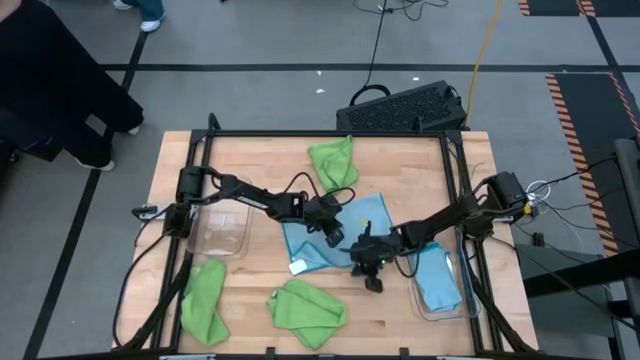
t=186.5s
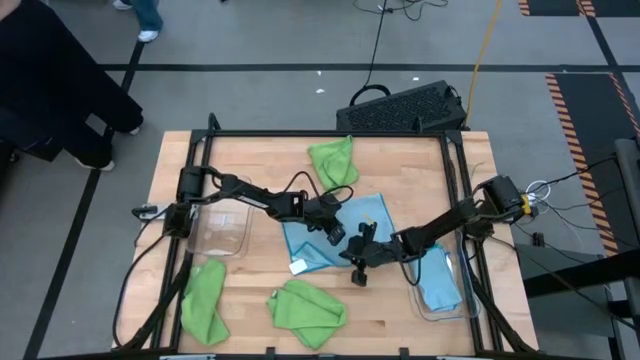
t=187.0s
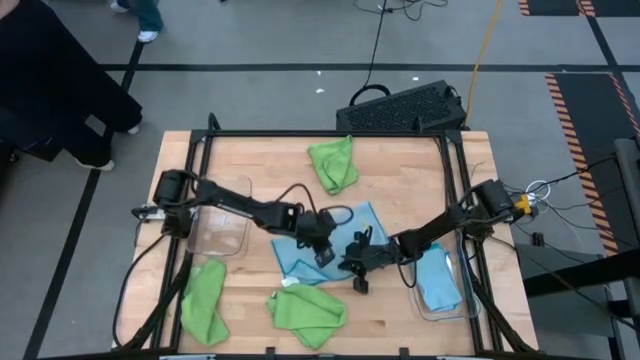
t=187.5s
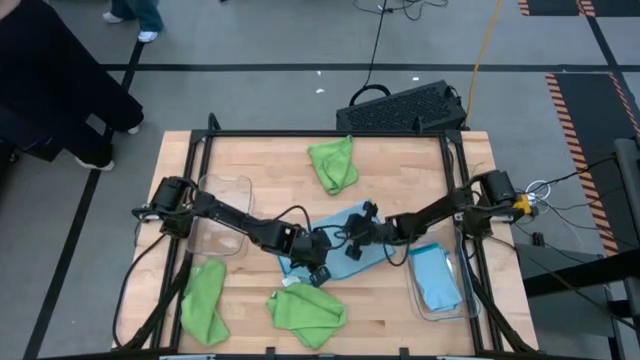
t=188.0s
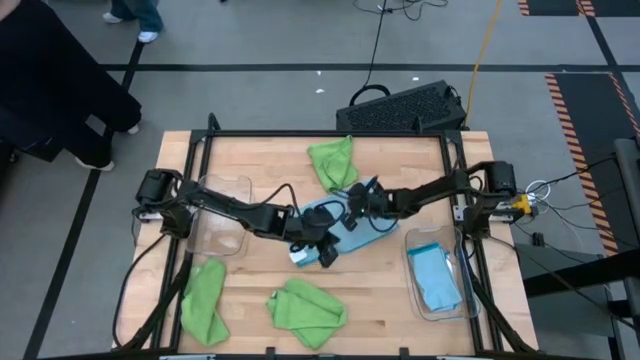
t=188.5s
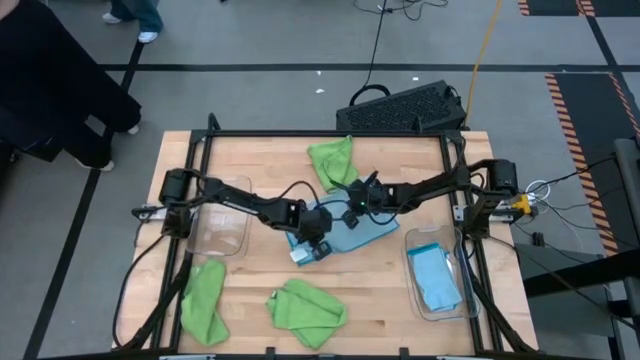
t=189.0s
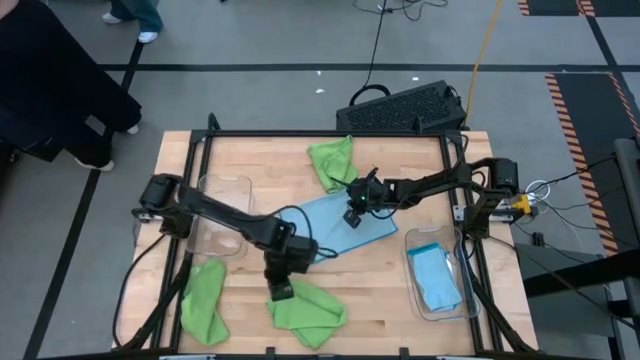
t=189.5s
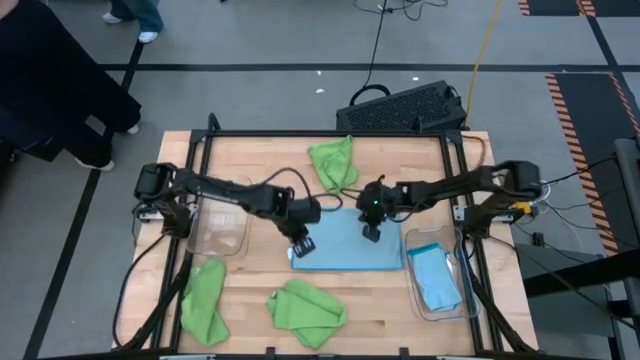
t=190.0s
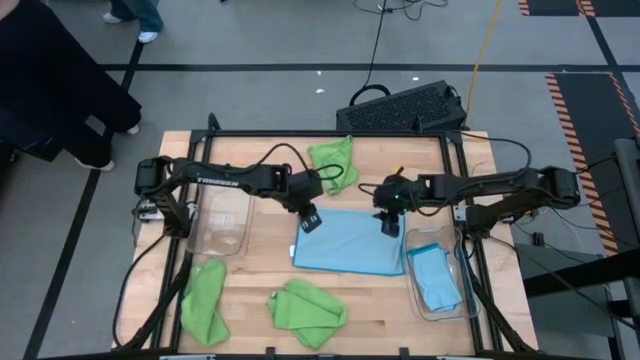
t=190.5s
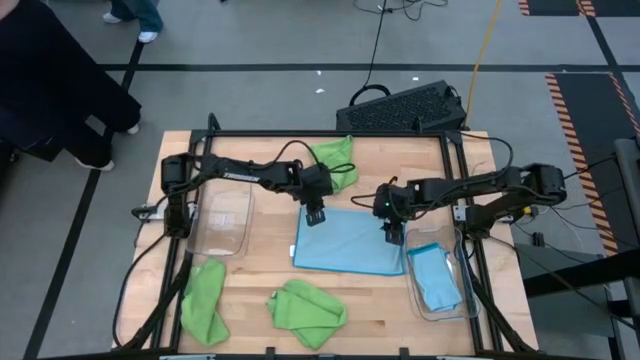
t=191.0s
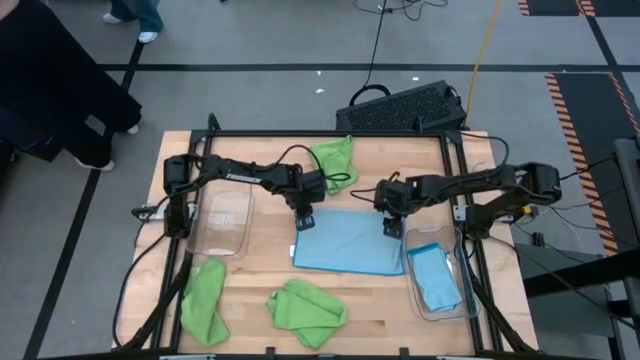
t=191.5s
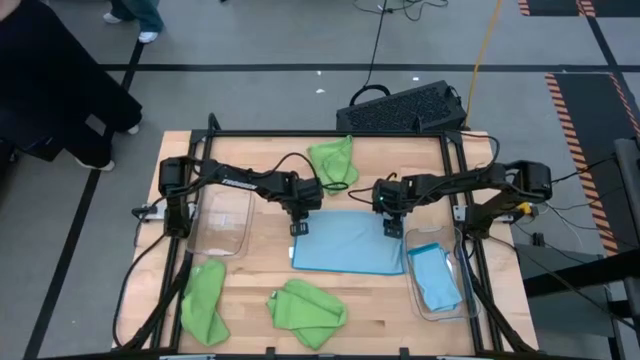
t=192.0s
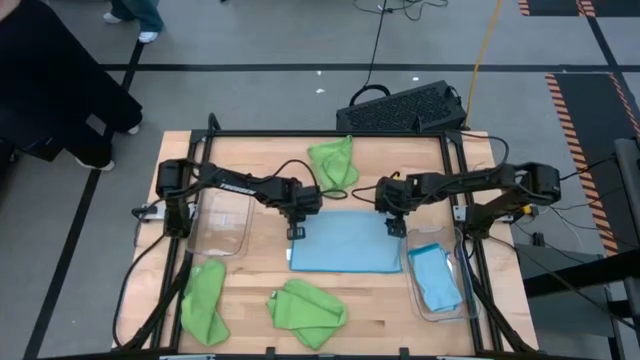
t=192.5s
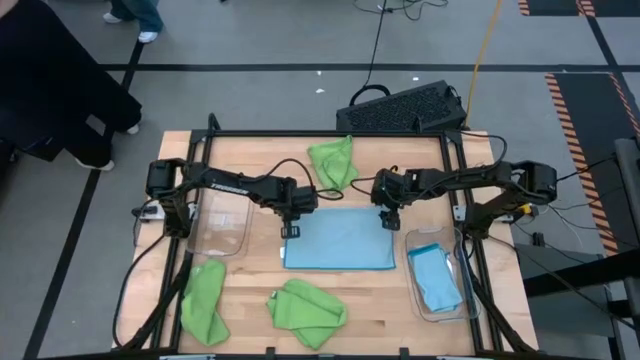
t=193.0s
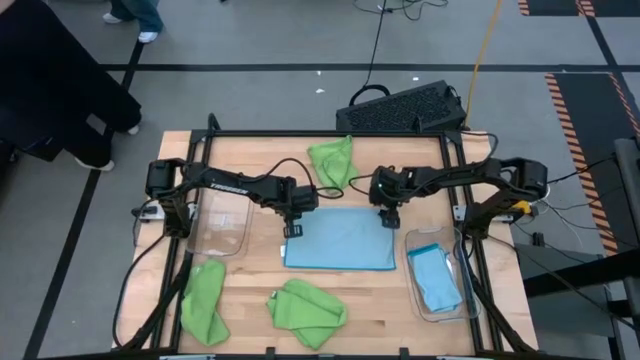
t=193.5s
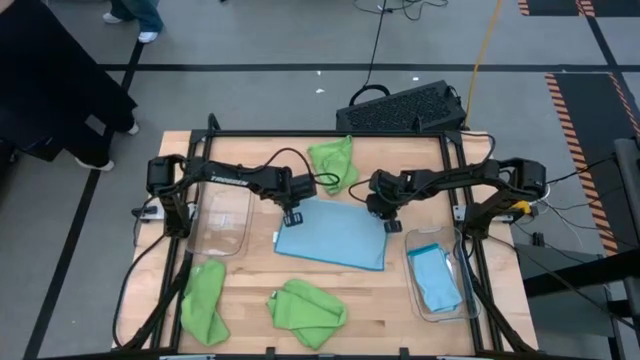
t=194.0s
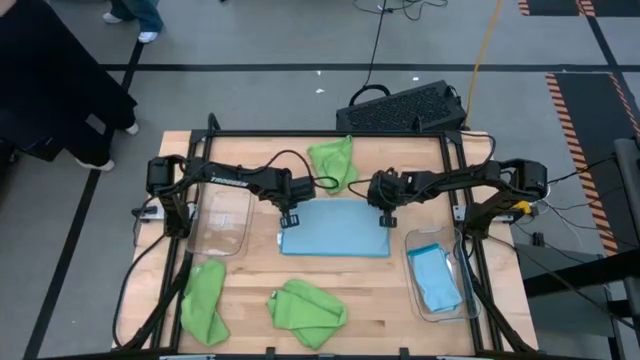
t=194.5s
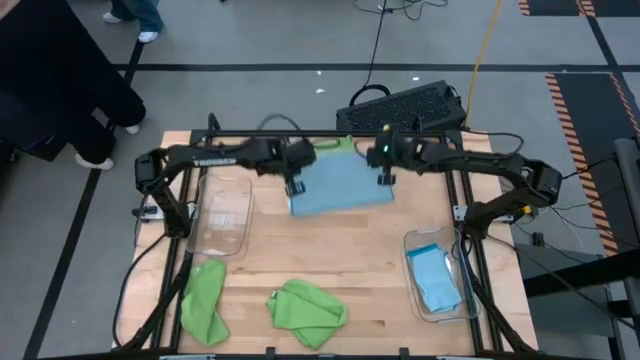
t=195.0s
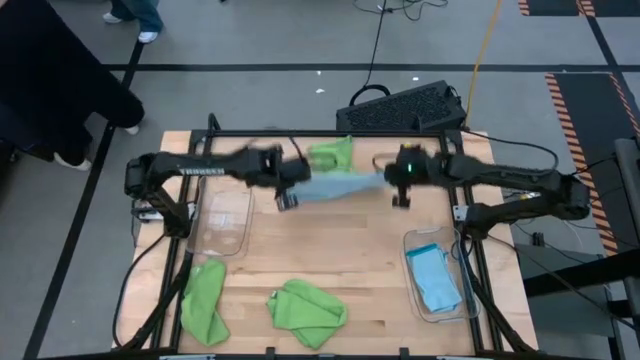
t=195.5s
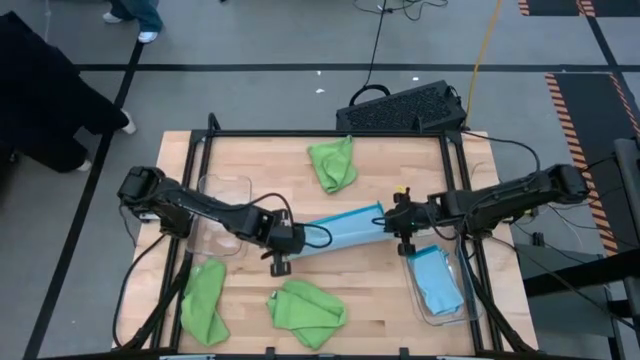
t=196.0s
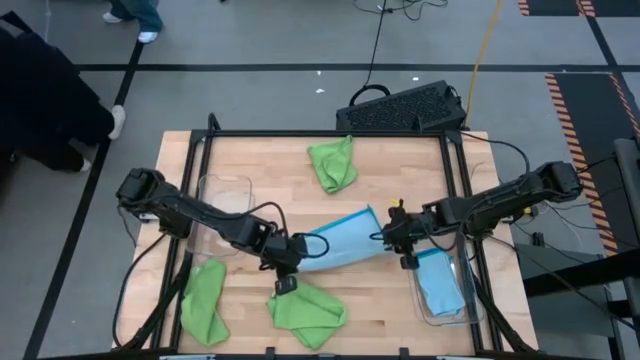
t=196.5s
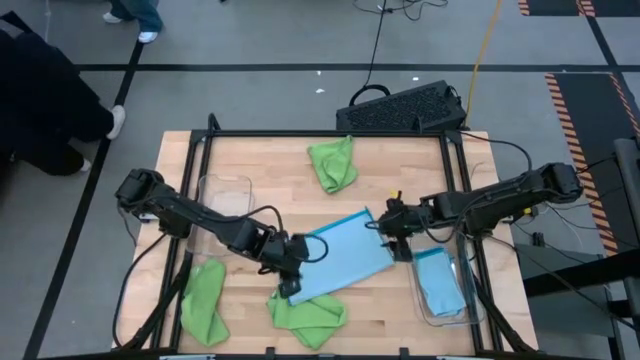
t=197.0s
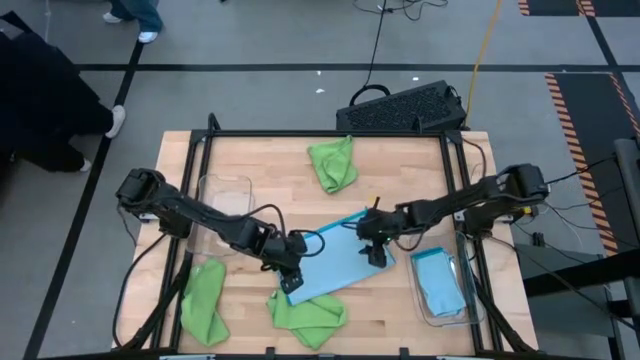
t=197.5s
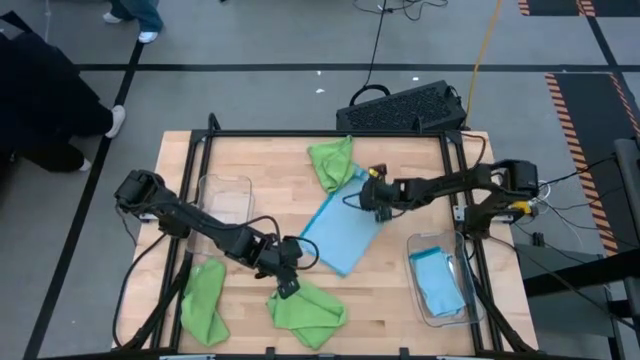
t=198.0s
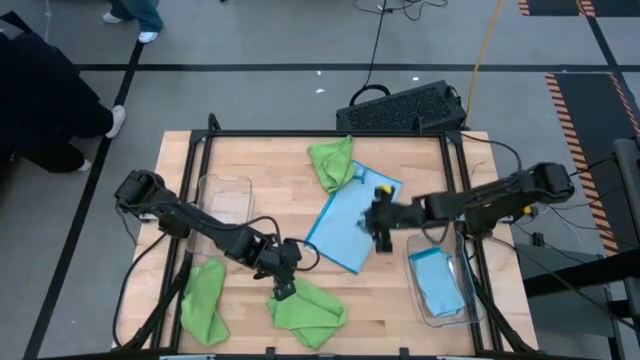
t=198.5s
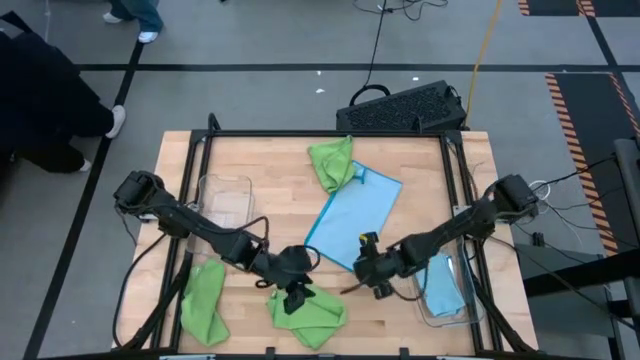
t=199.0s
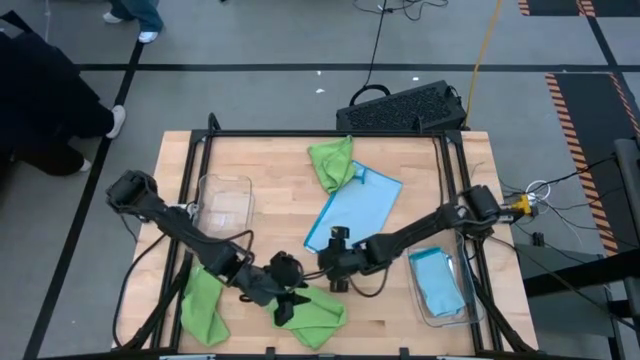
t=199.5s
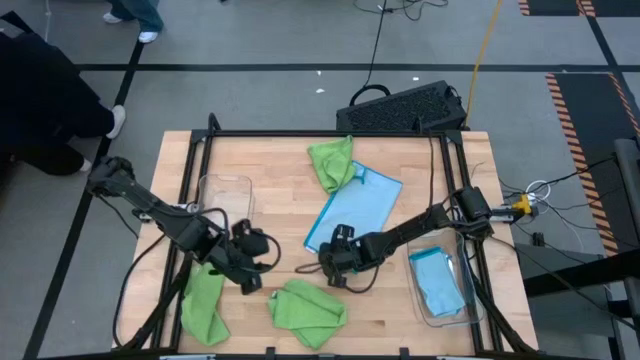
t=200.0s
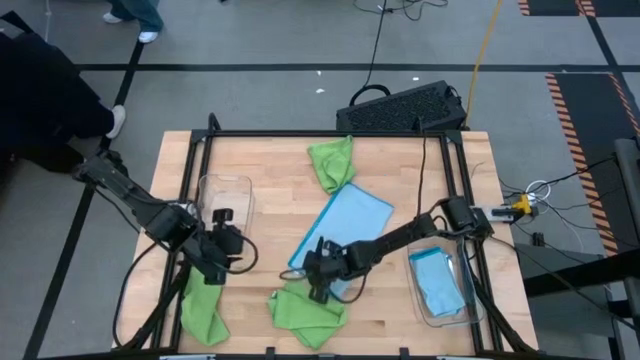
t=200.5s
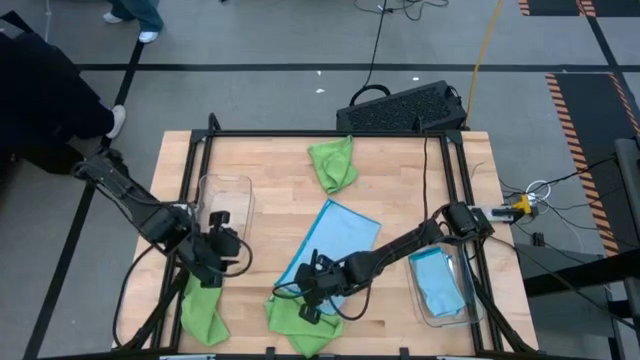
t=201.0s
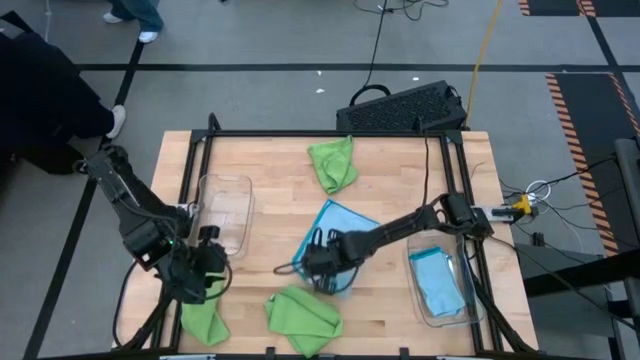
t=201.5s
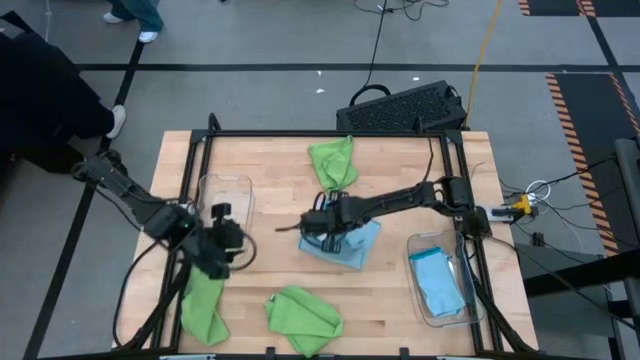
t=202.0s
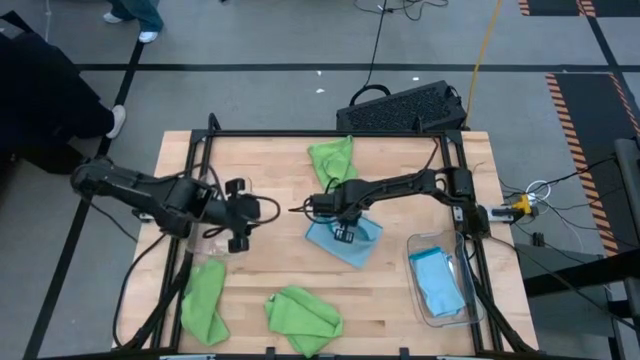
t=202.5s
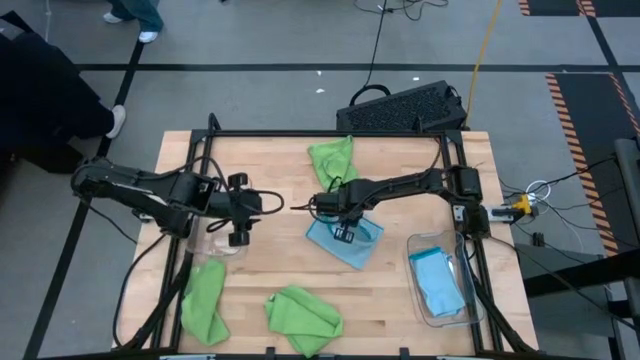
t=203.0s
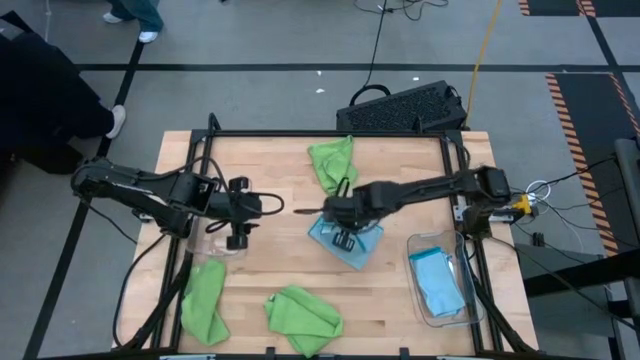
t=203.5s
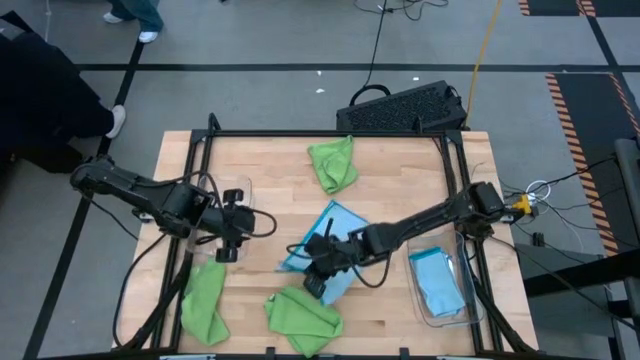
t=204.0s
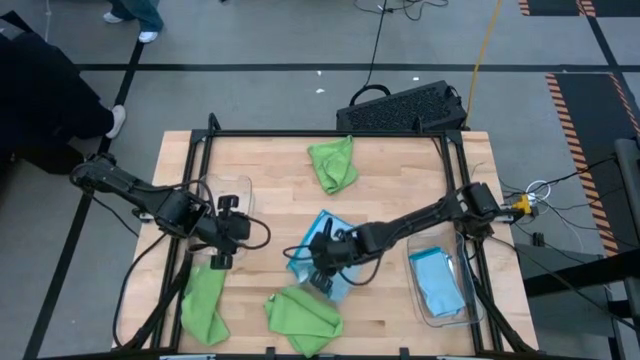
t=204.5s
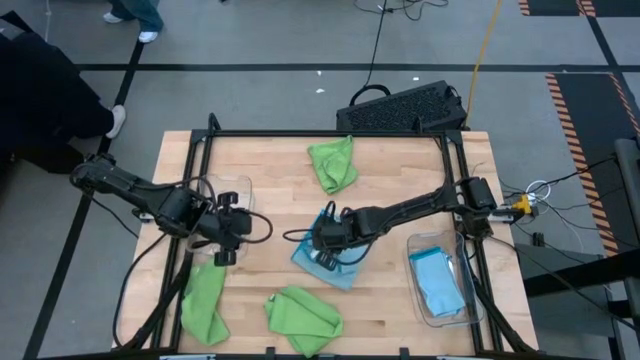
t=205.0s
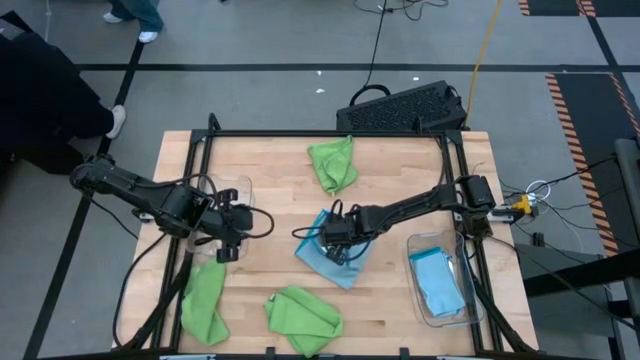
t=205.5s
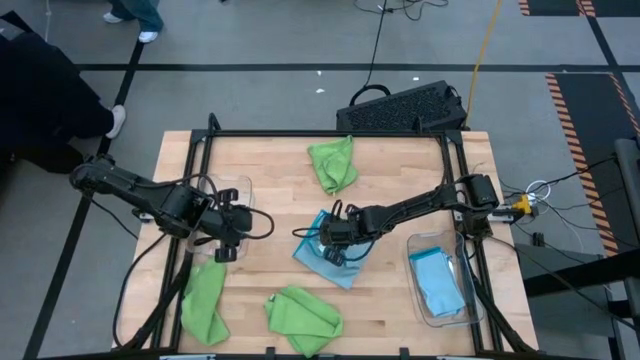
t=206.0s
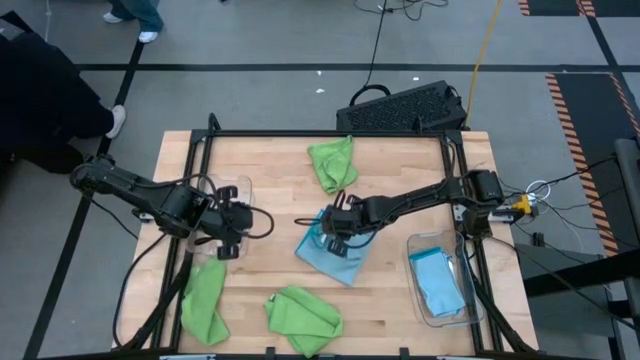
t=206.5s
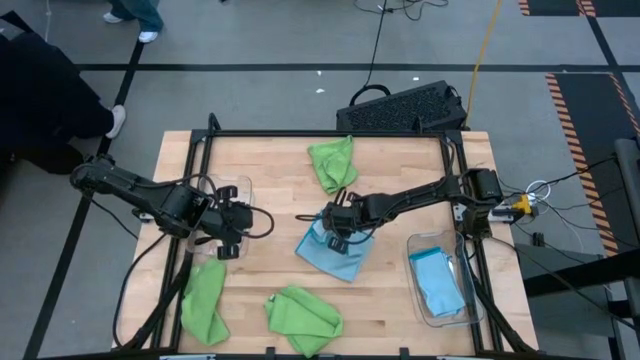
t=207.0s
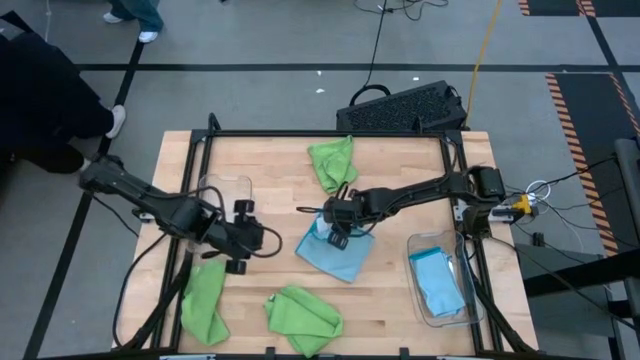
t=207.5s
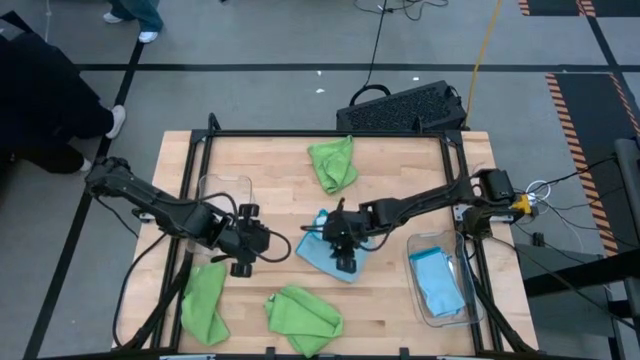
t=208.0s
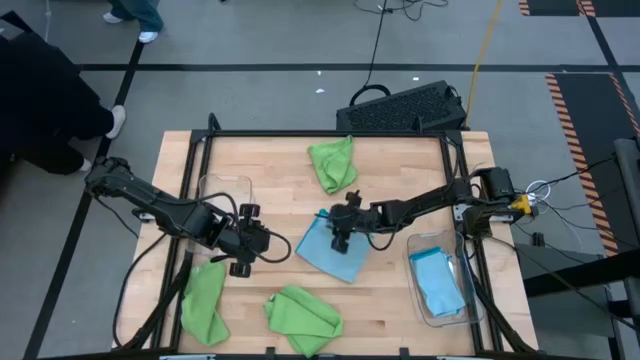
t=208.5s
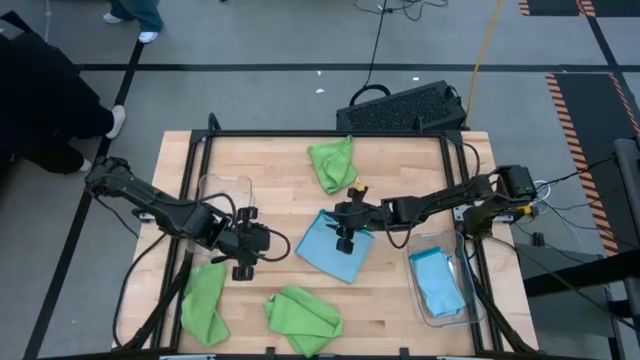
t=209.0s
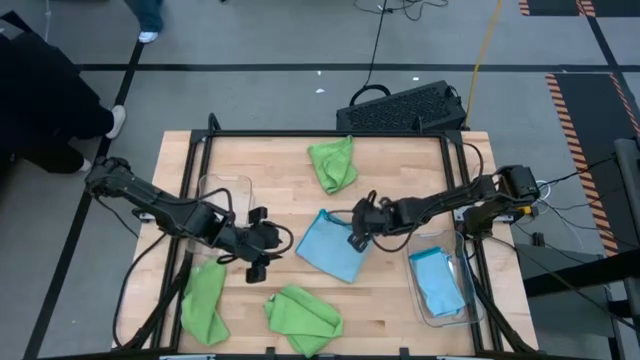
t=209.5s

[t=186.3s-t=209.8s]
Task: Sort microfiber towel by color & place in baskets
Fold the blue microfiber towel
